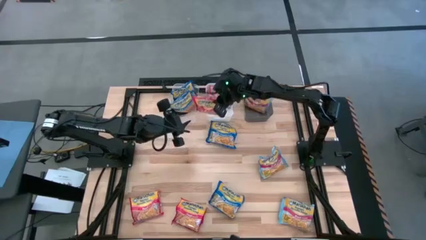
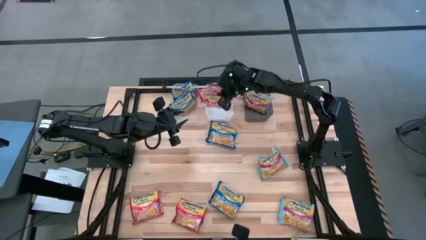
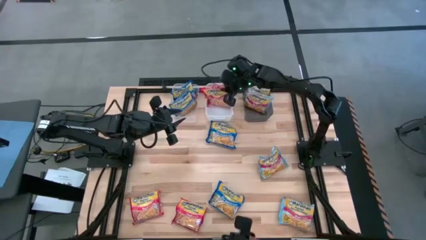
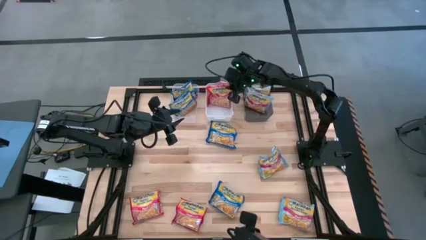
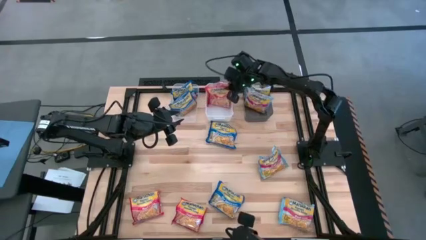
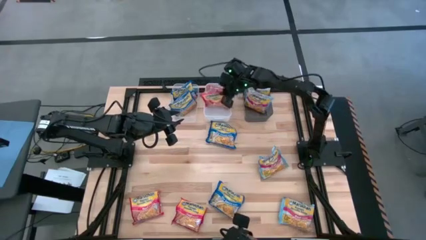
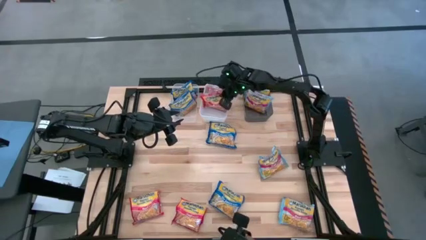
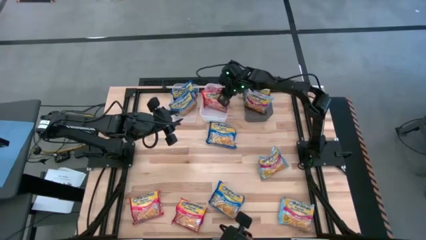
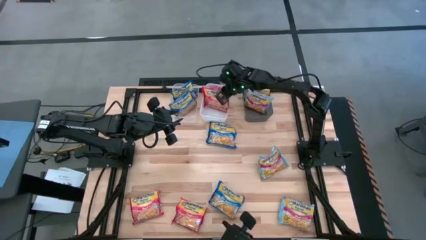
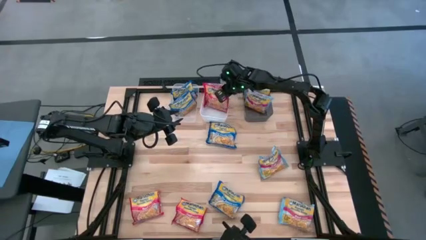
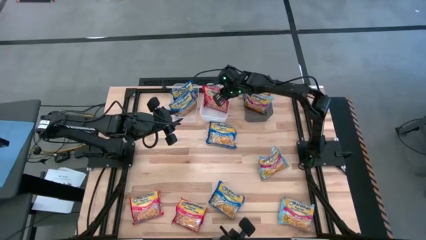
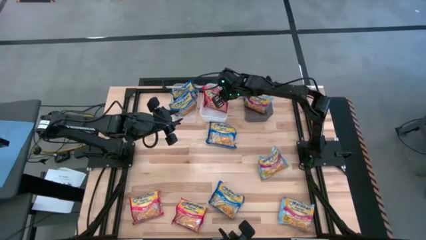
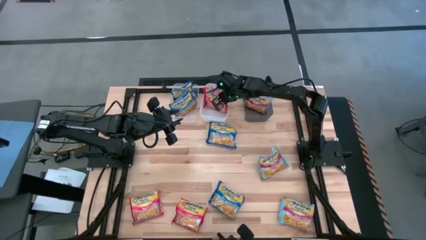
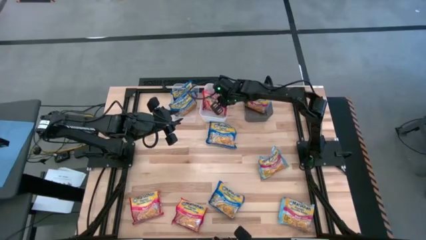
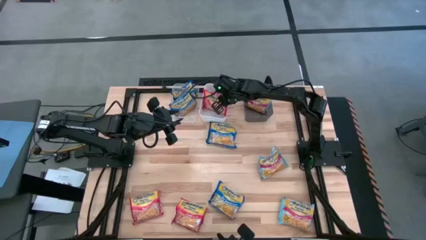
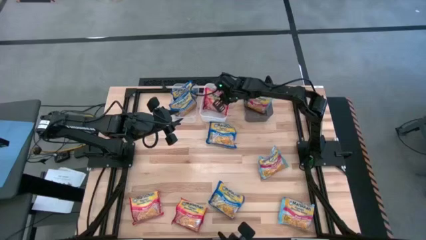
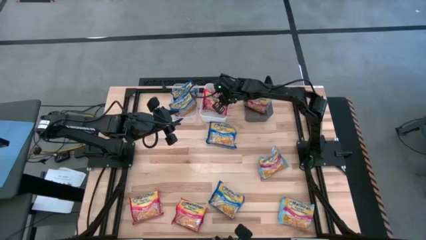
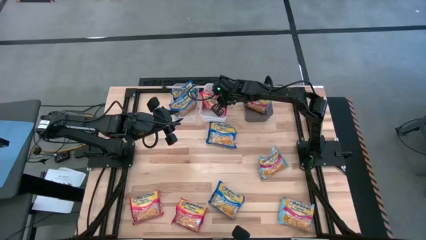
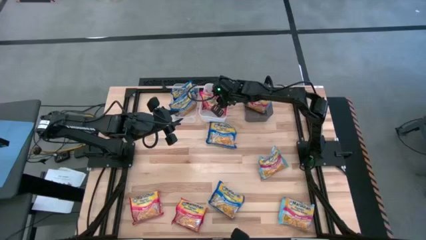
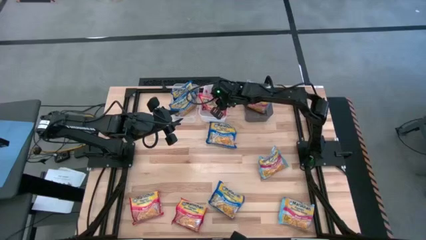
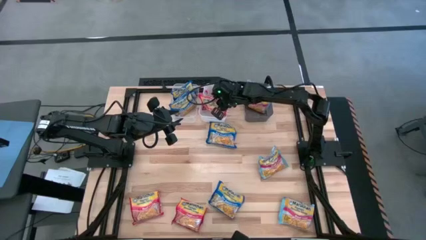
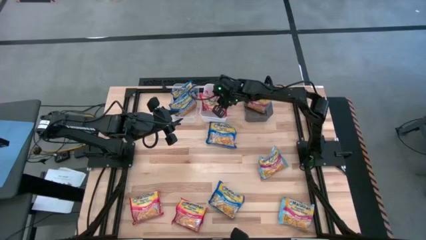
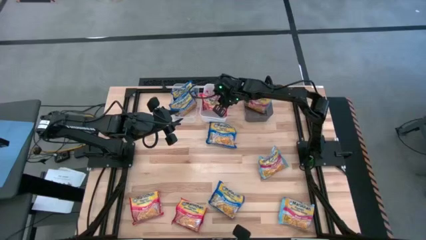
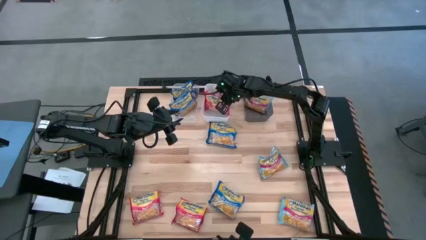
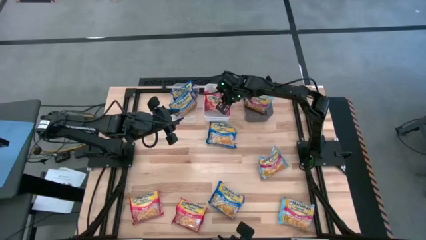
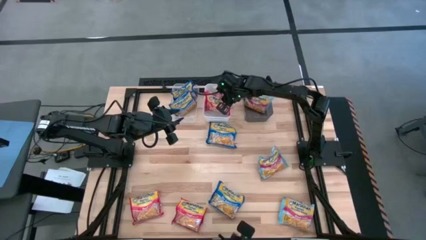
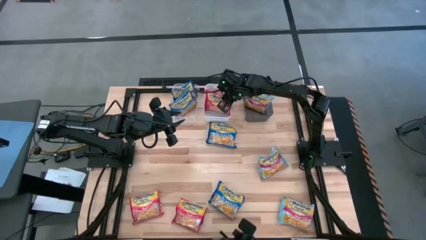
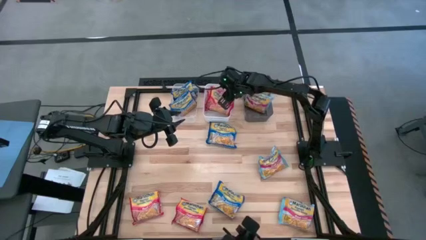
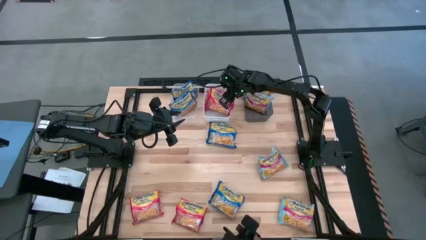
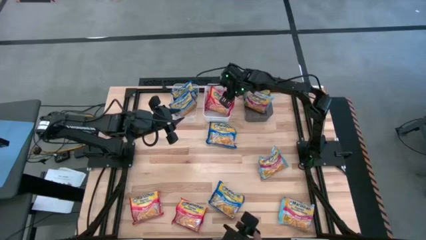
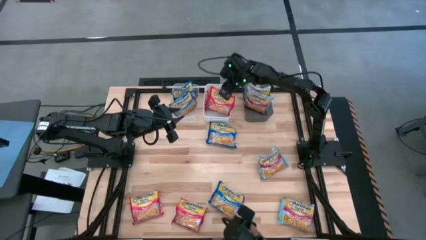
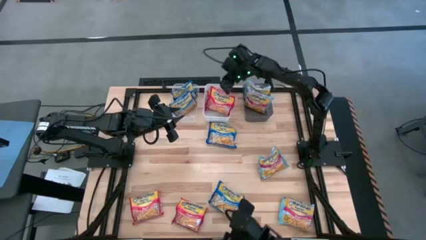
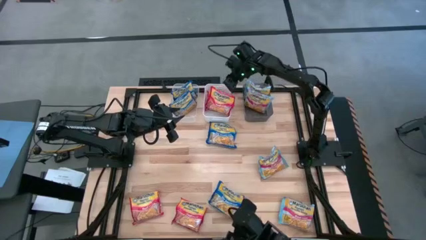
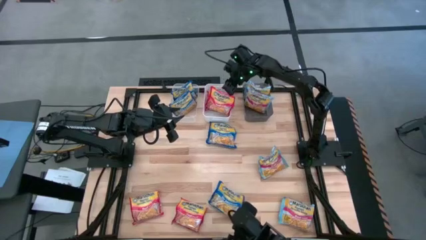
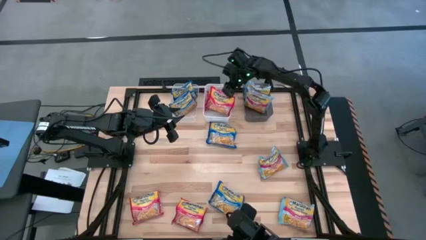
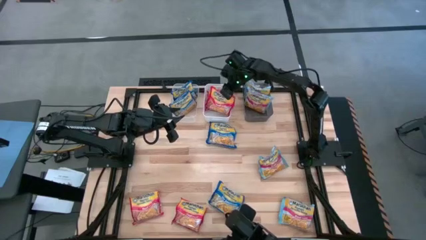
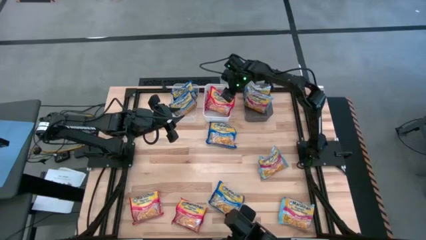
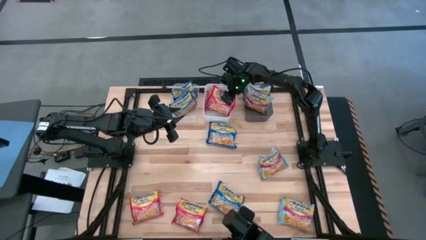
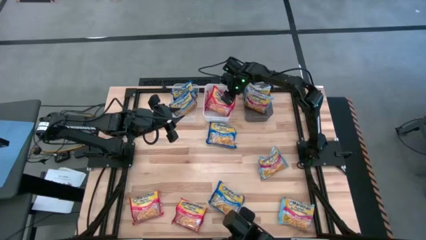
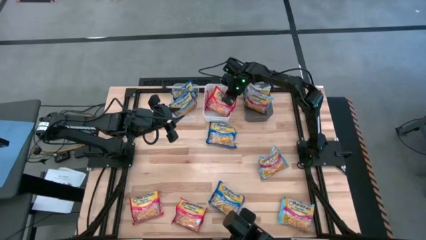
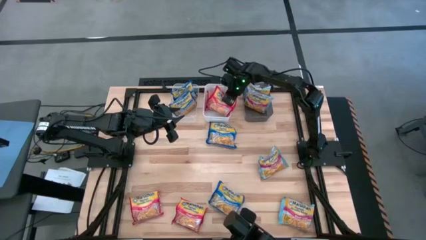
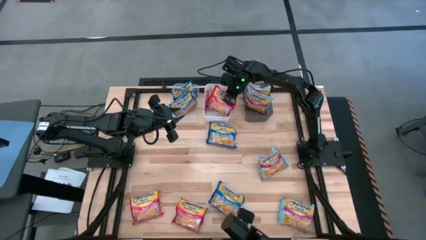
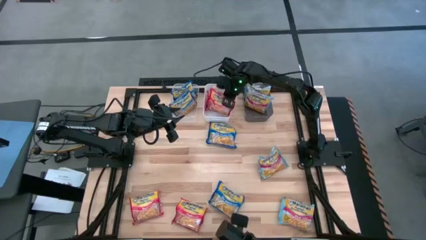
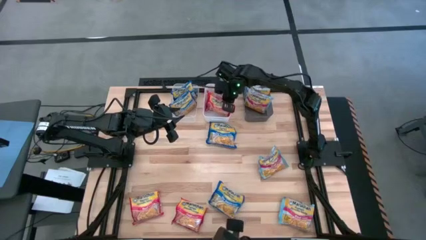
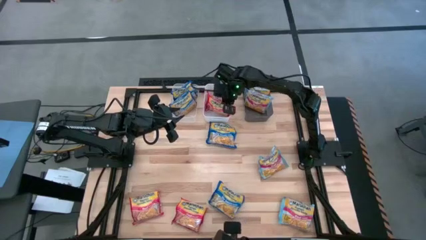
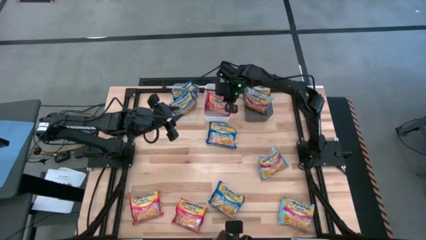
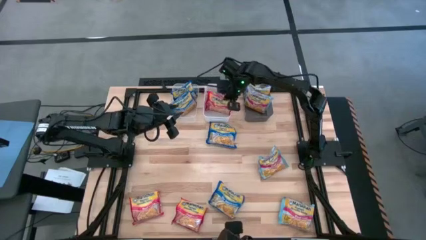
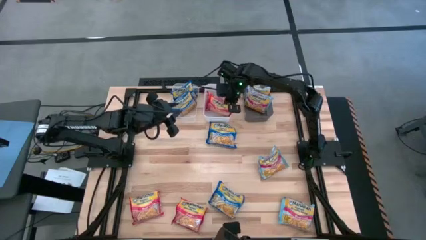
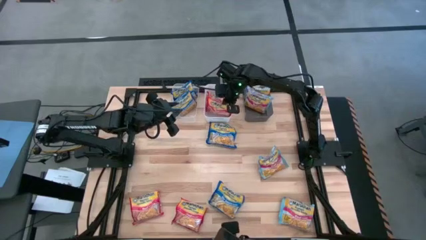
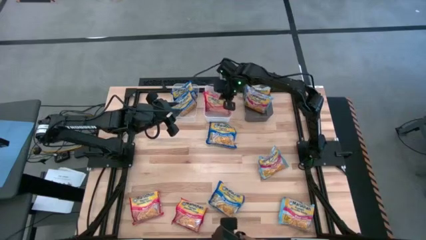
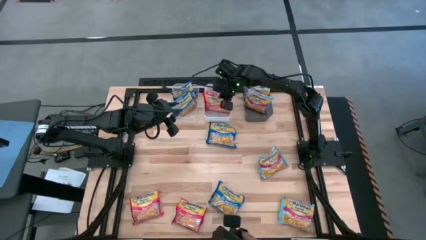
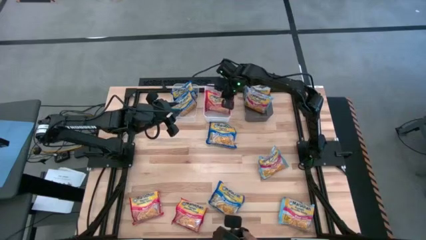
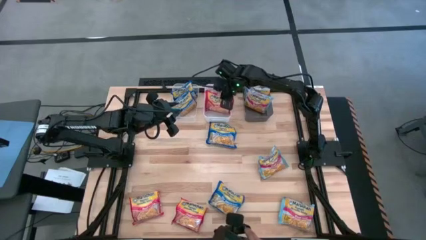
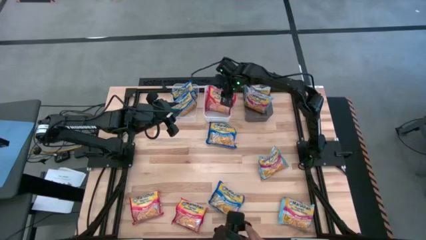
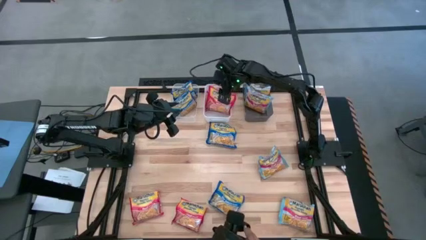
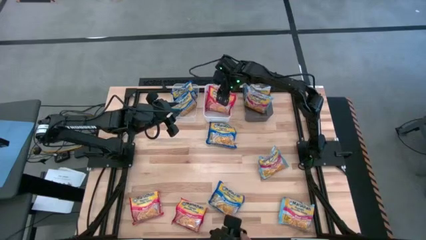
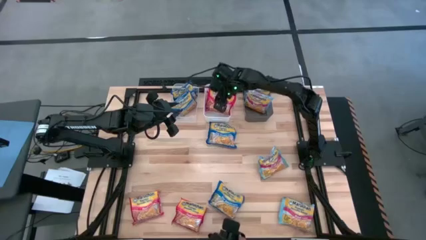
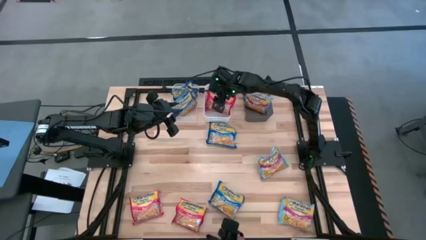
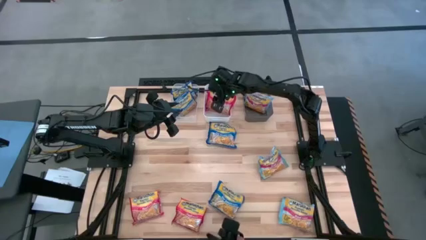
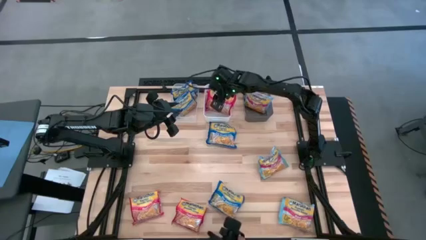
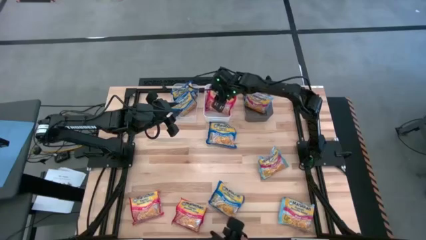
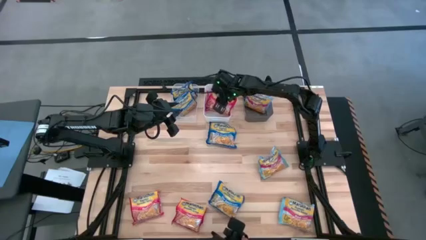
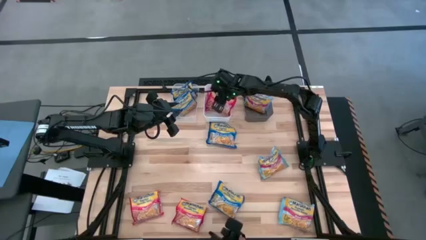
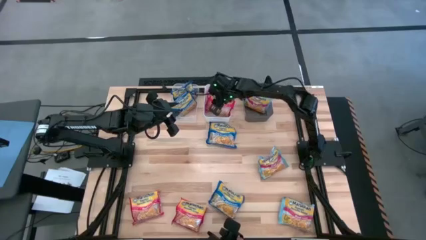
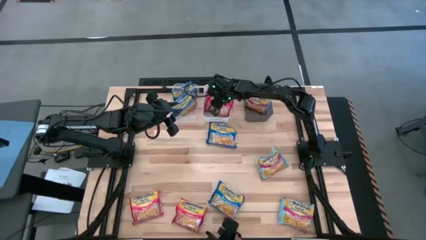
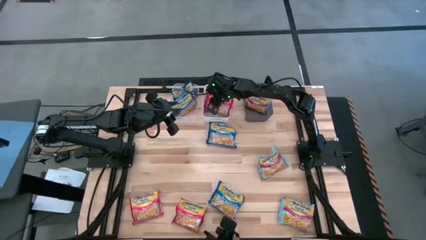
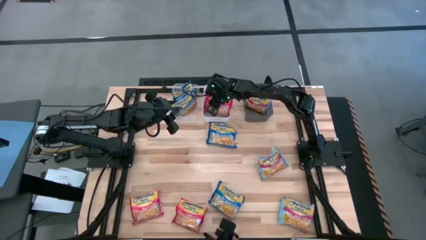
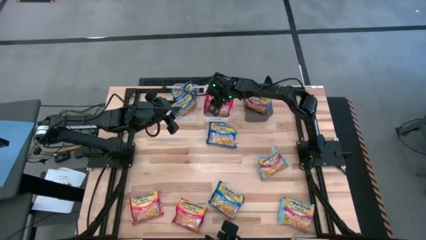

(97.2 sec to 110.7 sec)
Task: Sort Maruchan noodles
Put the red noodle pack into the white bin
